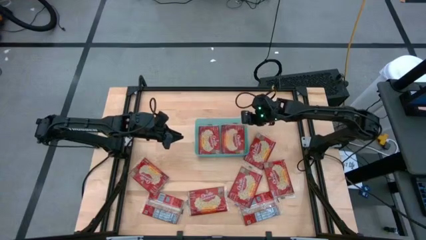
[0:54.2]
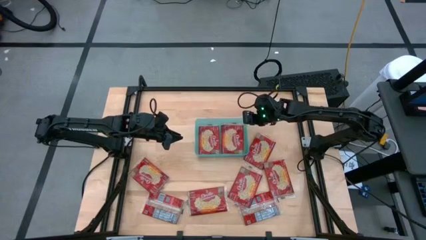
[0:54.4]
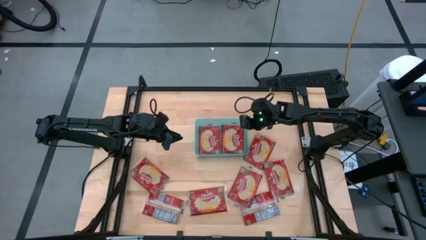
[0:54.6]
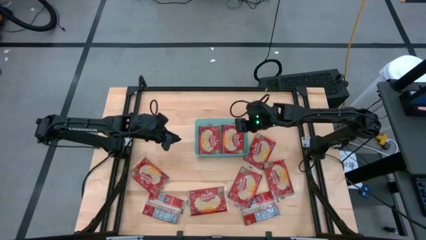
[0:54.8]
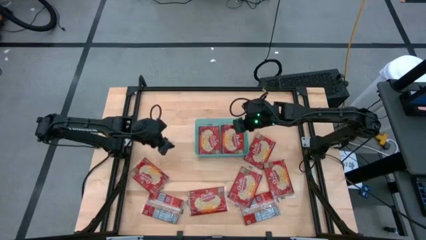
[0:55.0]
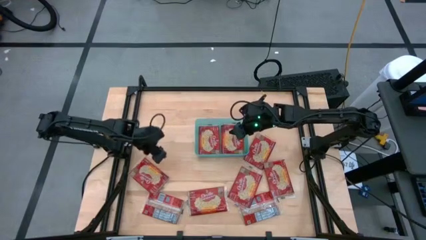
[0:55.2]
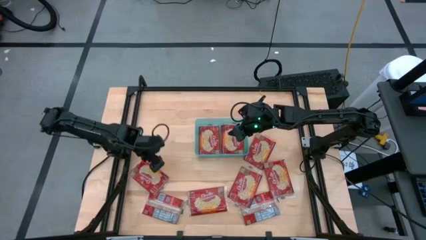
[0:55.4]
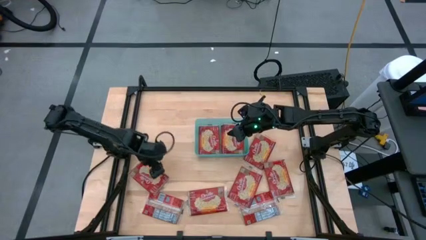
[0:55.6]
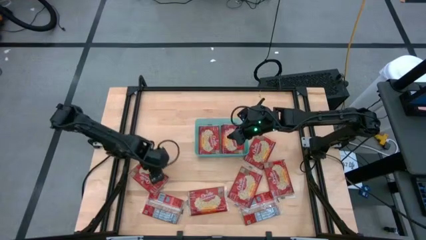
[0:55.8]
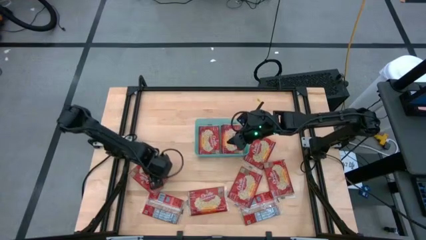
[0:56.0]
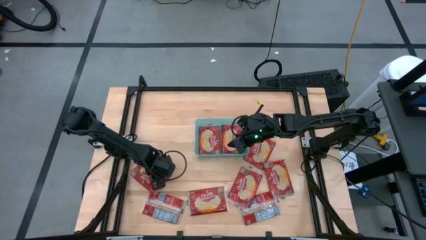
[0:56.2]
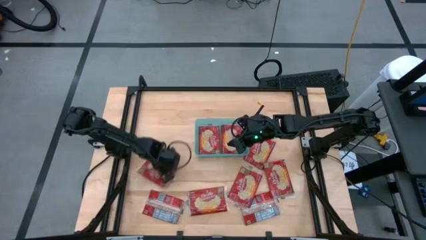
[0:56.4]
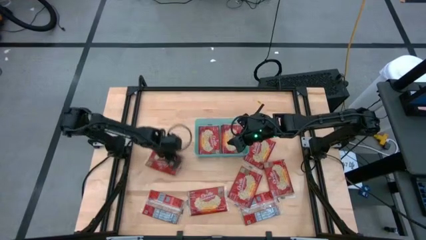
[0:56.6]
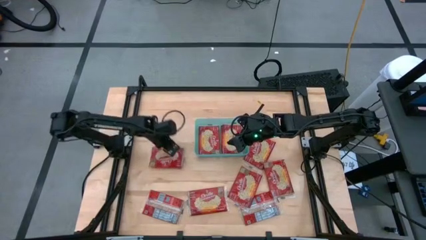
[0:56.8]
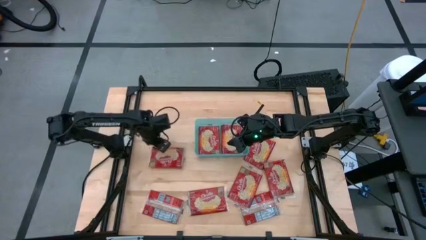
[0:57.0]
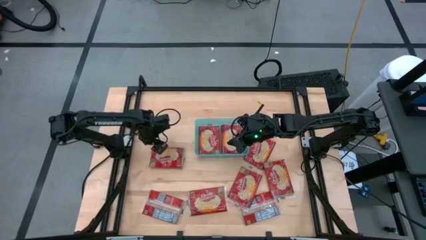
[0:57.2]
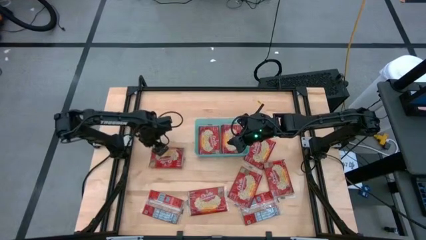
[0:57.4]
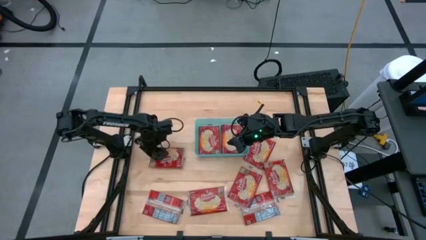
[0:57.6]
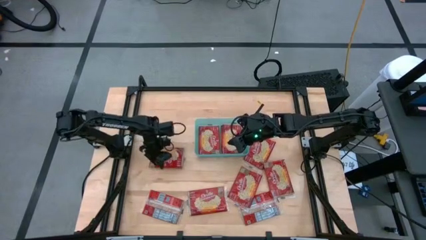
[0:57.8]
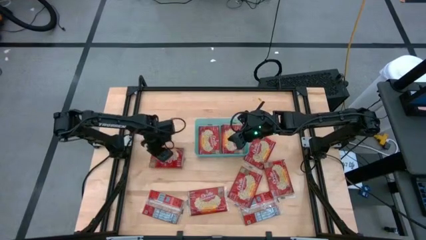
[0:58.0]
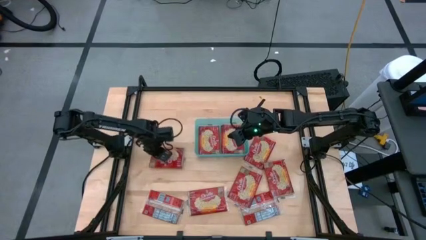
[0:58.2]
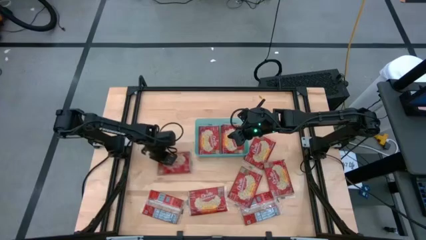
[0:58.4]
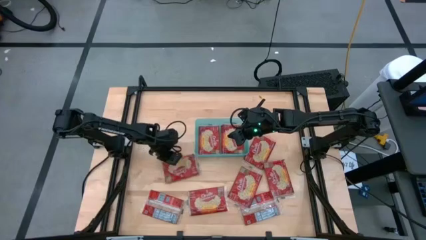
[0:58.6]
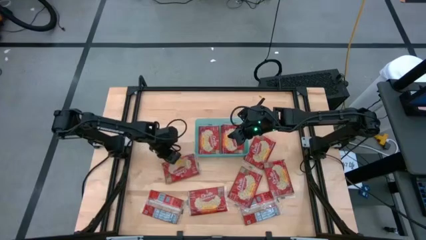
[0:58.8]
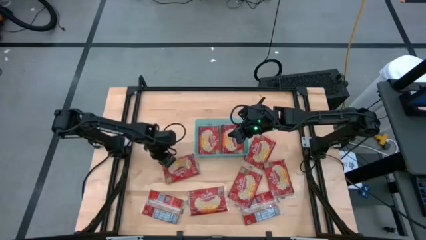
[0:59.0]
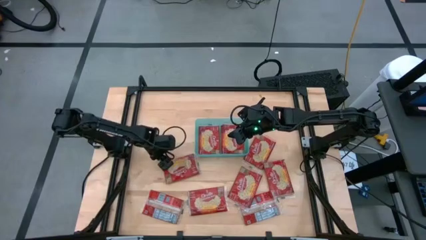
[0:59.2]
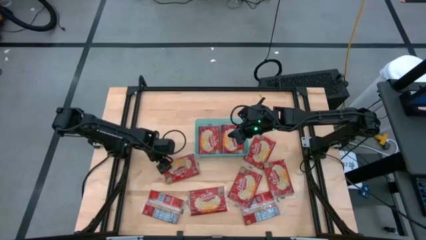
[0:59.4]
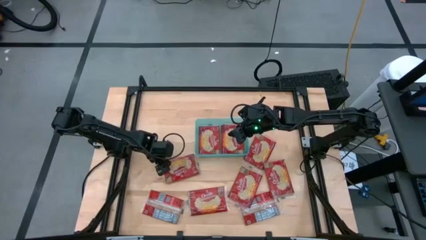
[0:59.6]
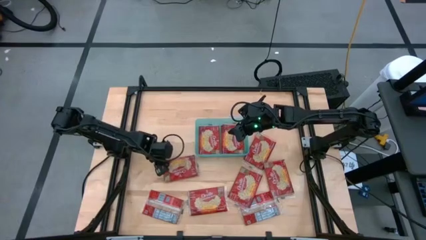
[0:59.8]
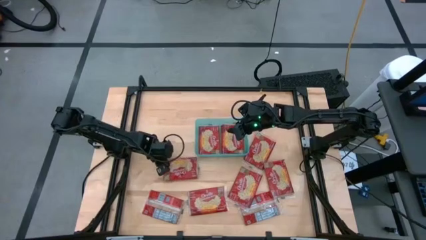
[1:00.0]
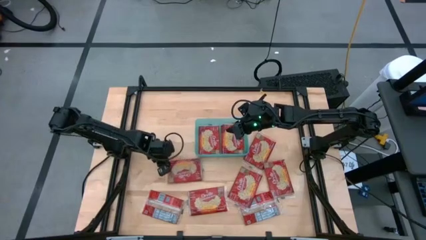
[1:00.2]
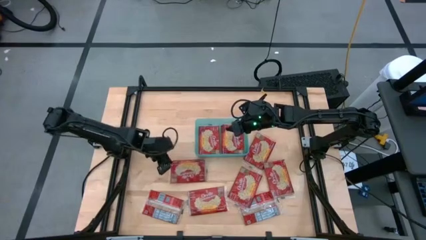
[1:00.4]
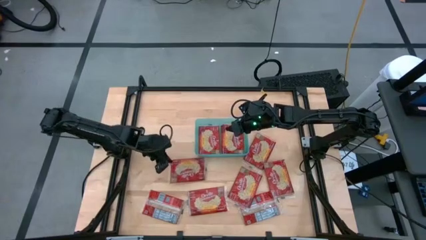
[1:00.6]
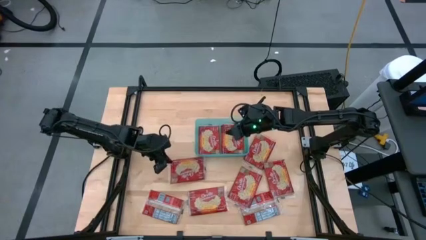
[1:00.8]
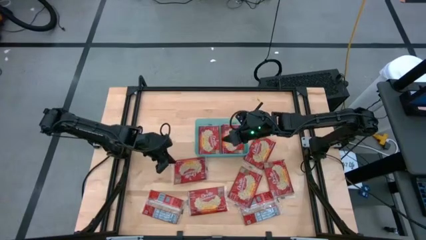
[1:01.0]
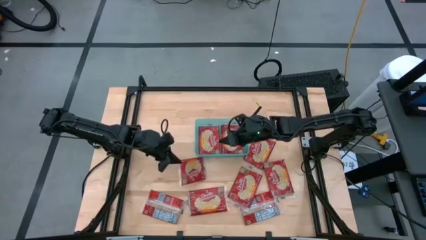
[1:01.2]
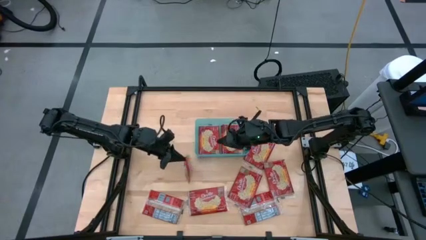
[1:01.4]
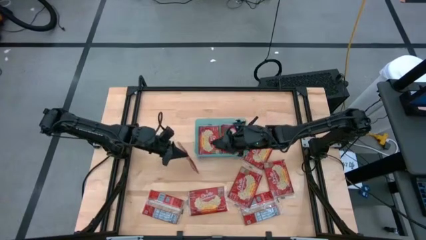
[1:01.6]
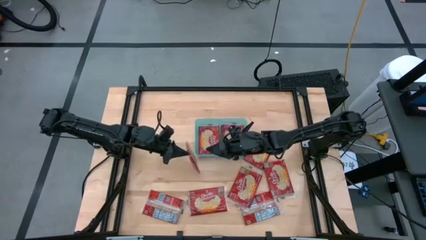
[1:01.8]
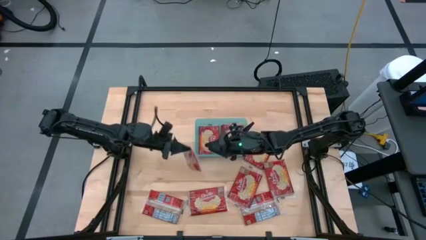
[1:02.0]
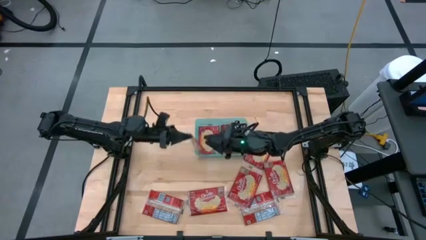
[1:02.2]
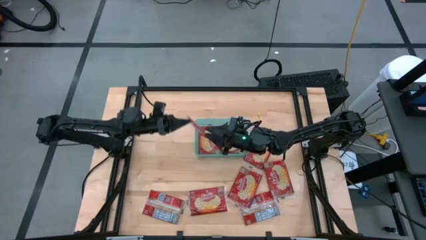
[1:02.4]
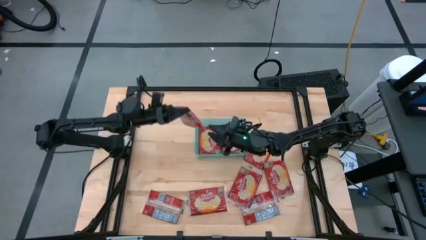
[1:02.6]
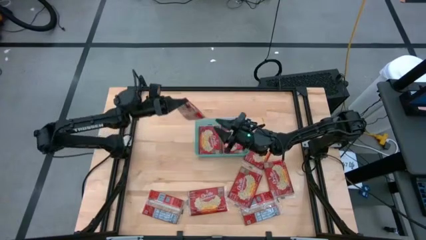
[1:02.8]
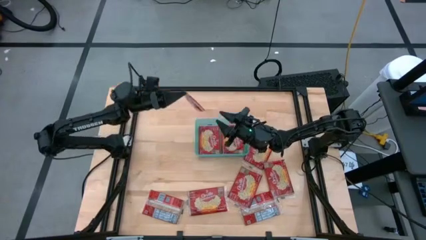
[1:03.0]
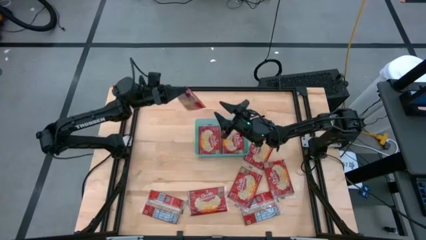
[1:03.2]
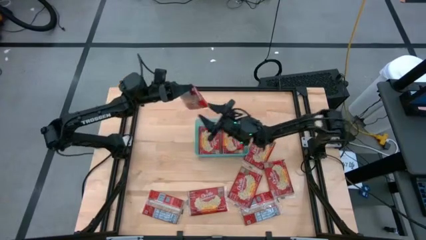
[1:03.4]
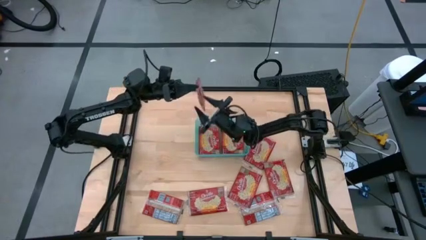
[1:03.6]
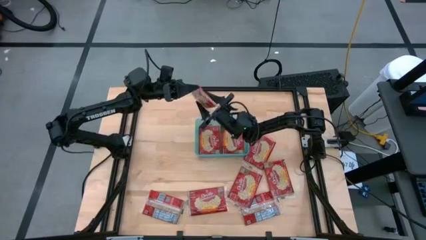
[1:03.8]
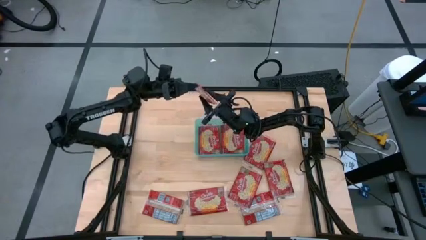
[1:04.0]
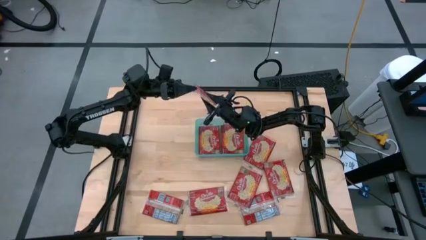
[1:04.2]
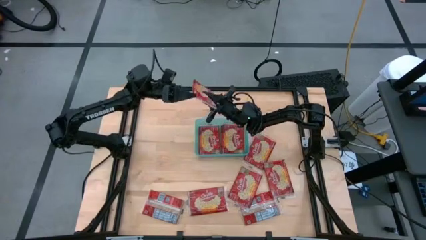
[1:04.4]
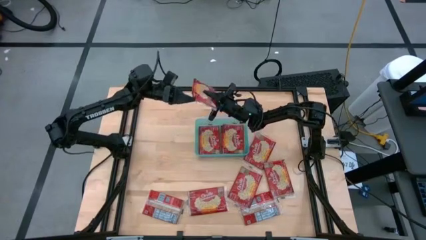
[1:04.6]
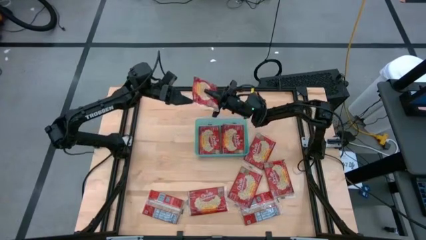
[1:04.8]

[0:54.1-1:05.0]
Task: Sort popcorn bags into baskets
Put the red popcorn bag into the green bin
